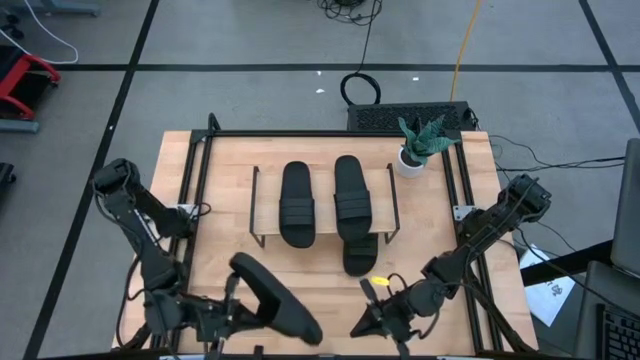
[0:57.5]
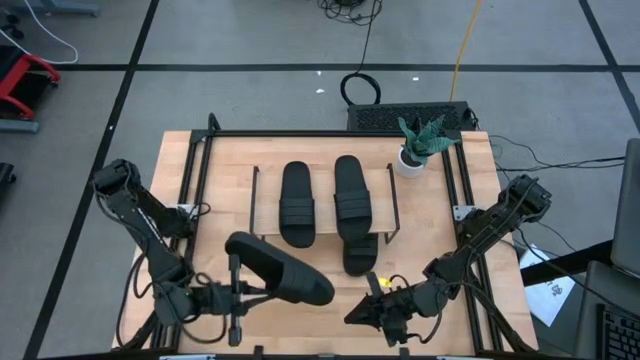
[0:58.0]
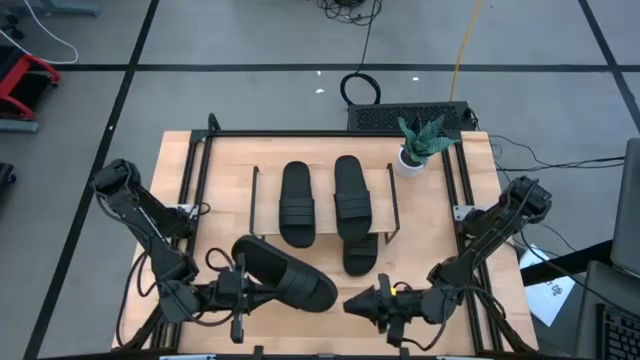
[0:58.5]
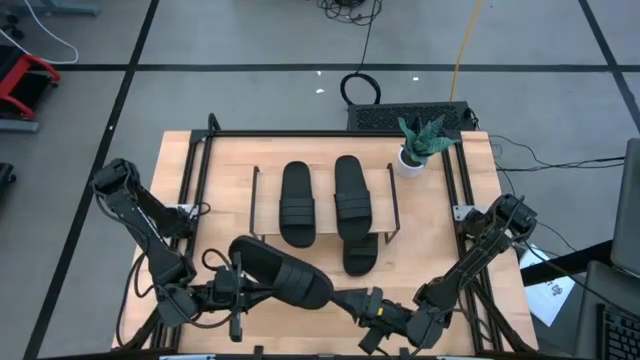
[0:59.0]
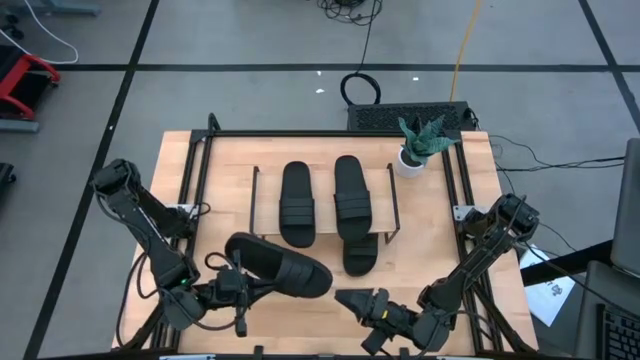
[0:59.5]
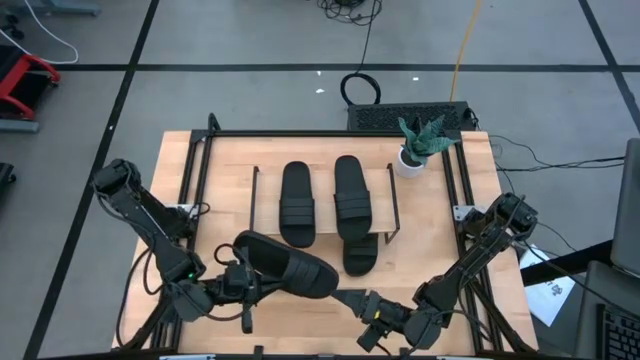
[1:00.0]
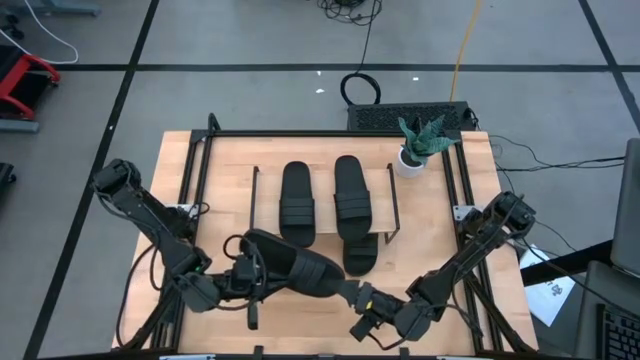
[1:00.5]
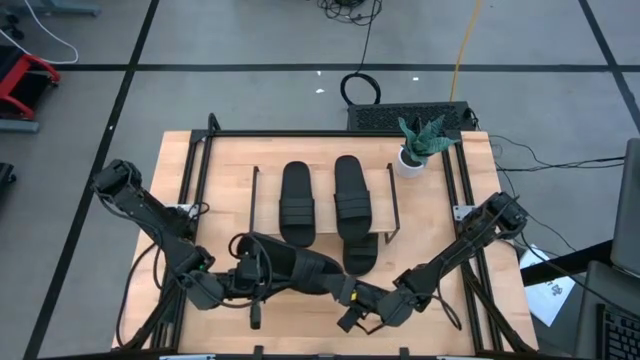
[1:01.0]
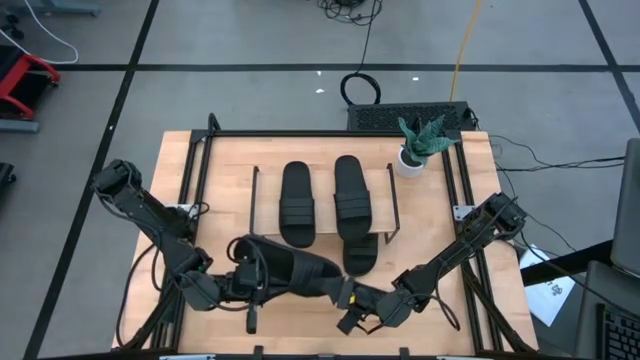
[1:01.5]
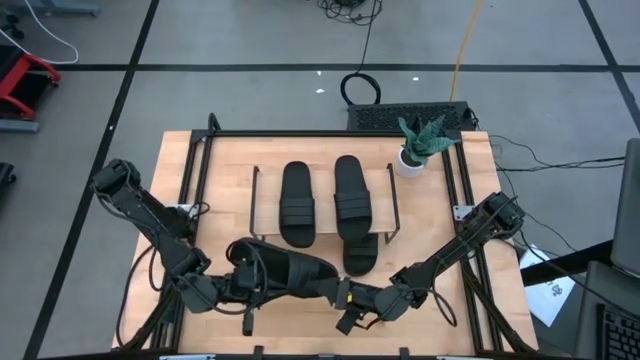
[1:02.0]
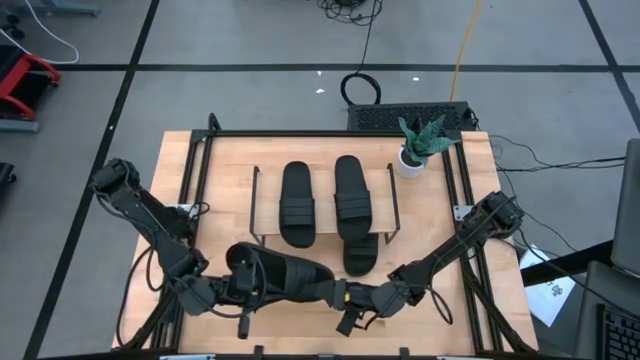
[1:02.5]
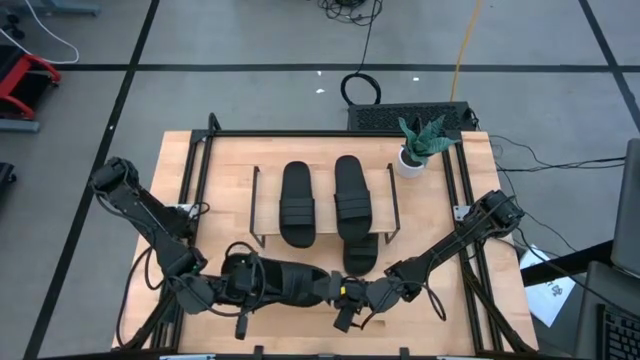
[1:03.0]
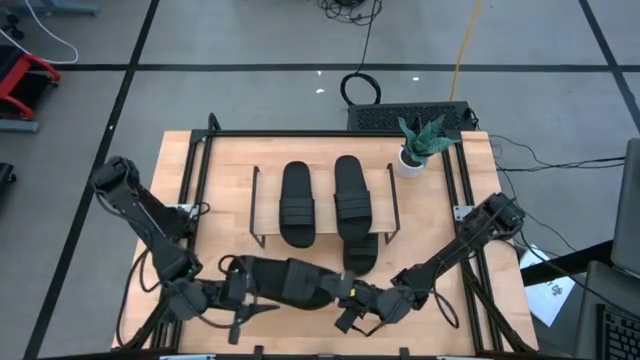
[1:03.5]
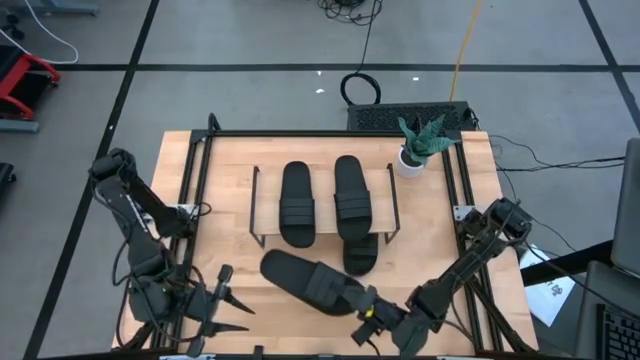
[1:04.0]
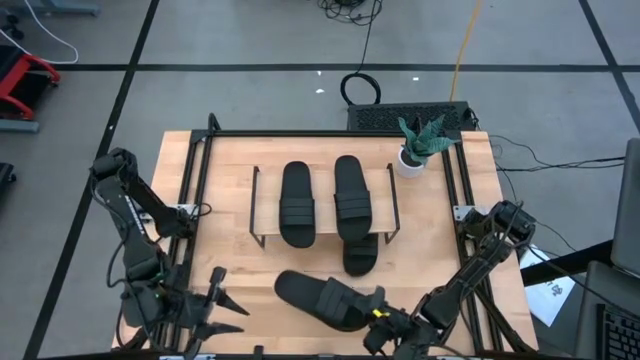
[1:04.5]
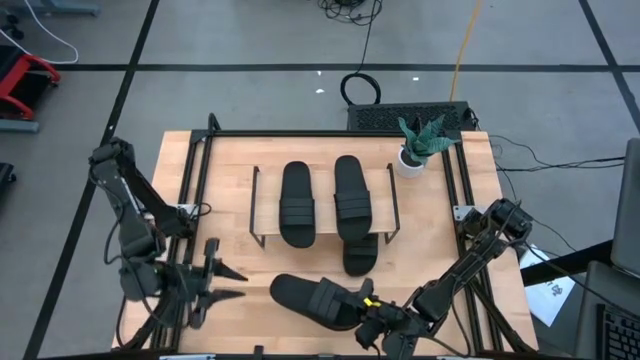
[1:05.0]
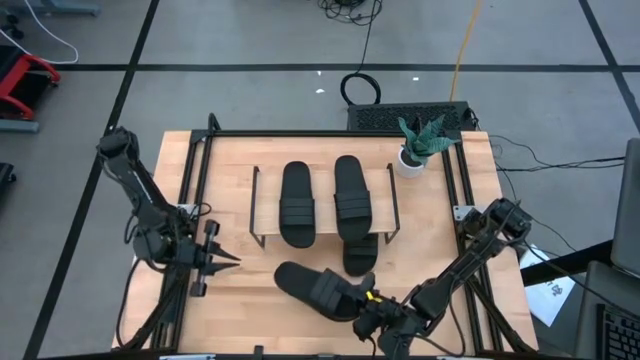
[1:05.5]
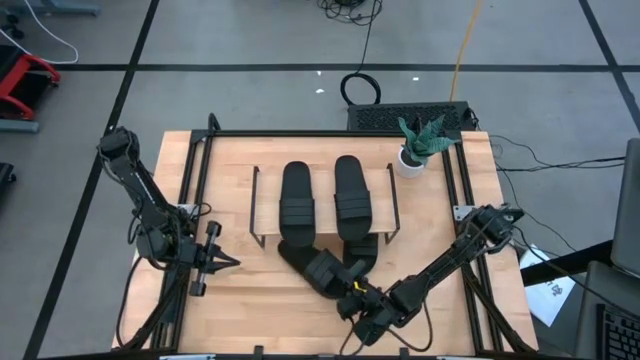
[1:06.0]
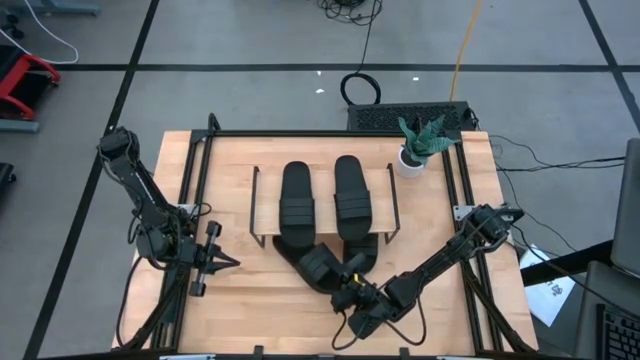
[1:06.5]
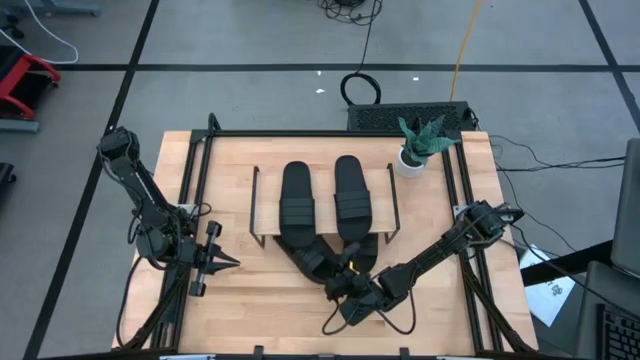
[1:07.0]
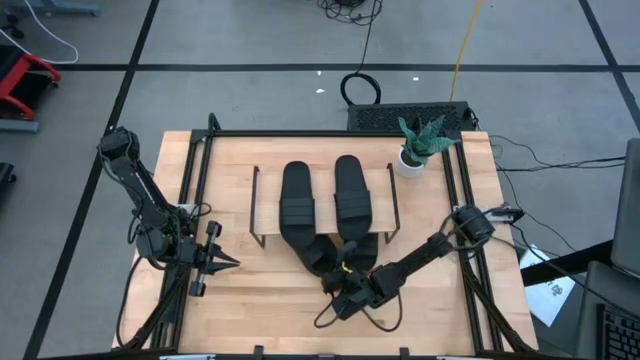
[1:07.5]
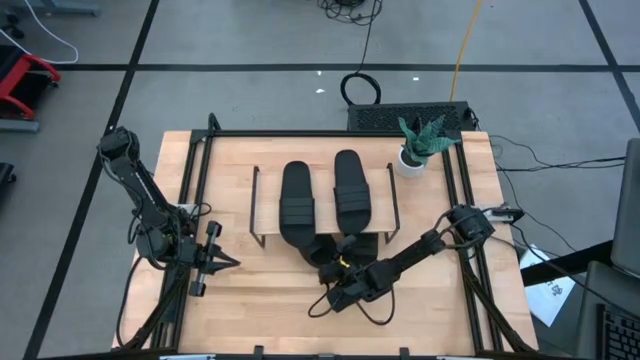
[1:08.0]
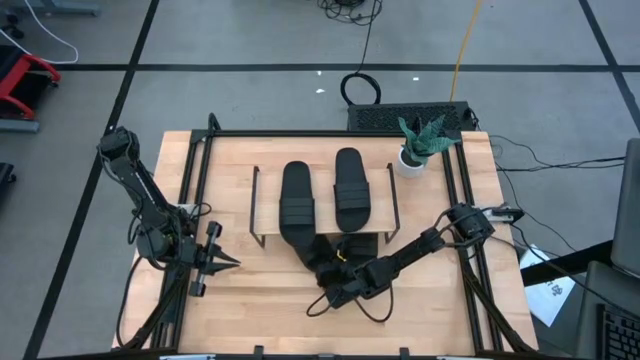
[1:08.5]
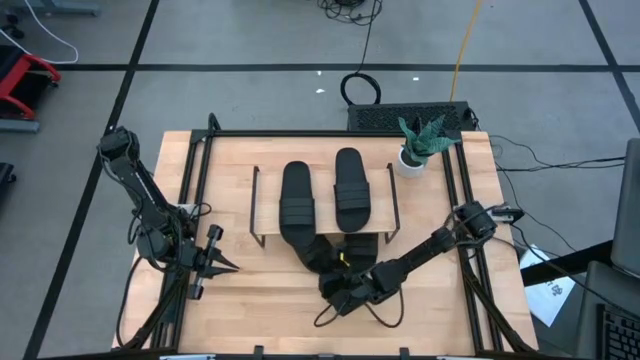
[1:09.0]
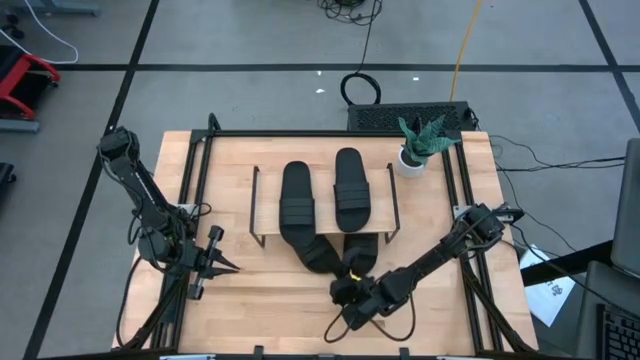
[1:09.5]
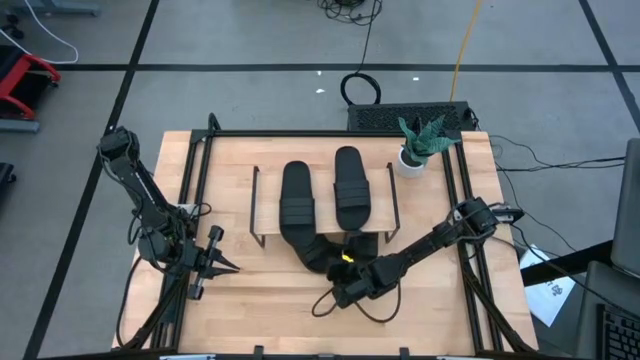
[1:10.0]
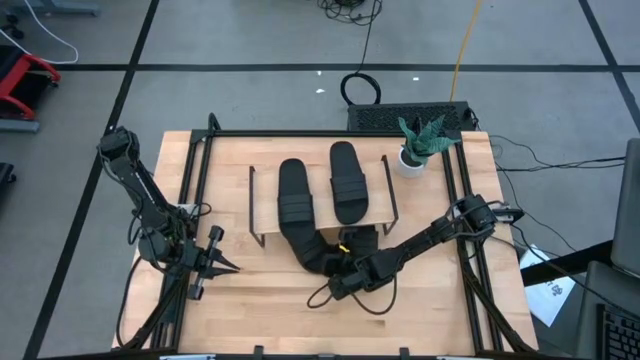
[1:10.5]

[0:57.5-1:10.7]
Task: Pick and place slides into the shelf
Put the black slide under the shelf

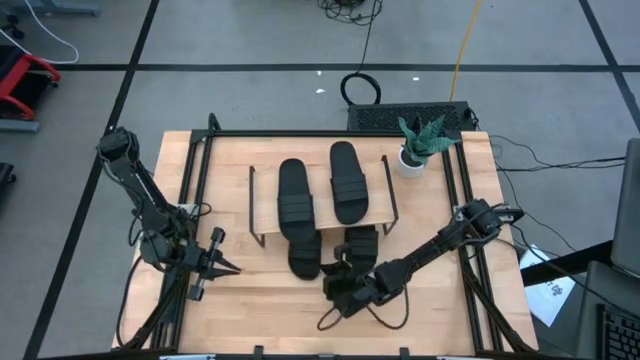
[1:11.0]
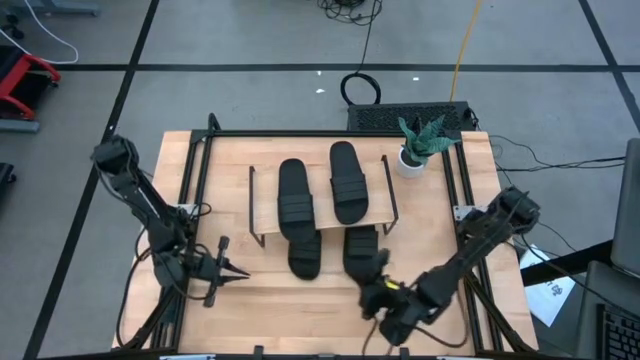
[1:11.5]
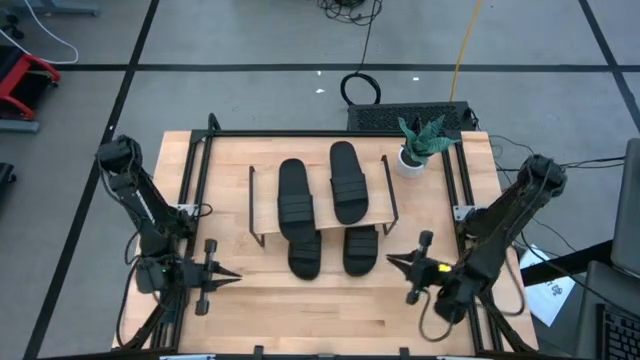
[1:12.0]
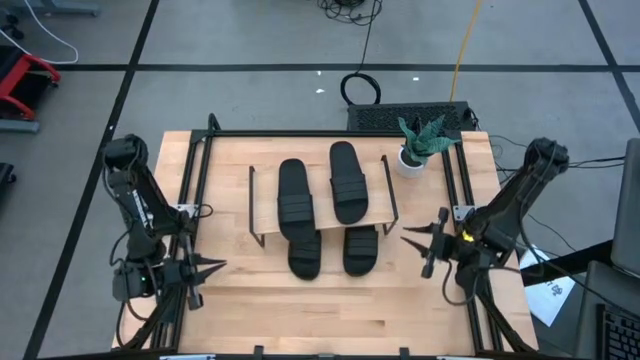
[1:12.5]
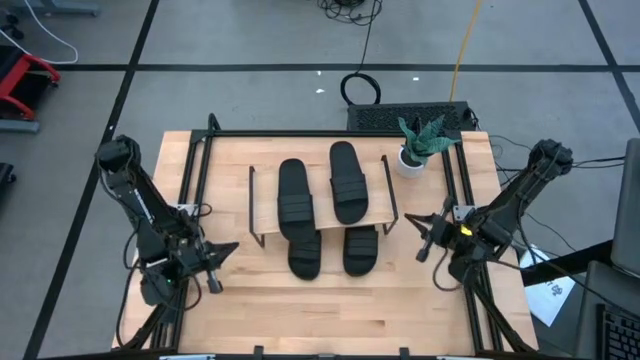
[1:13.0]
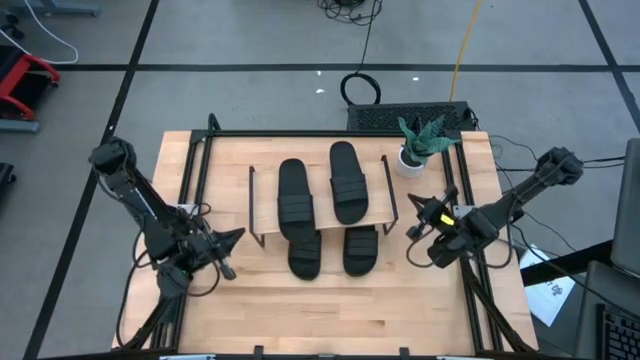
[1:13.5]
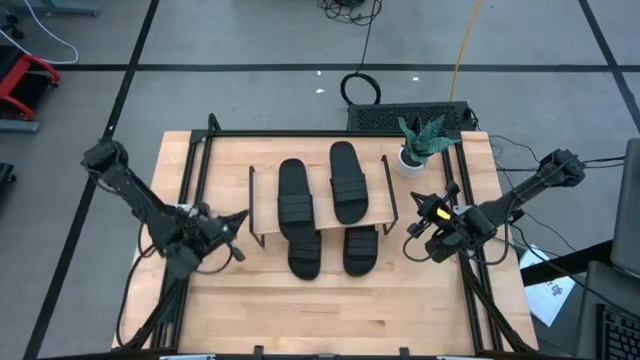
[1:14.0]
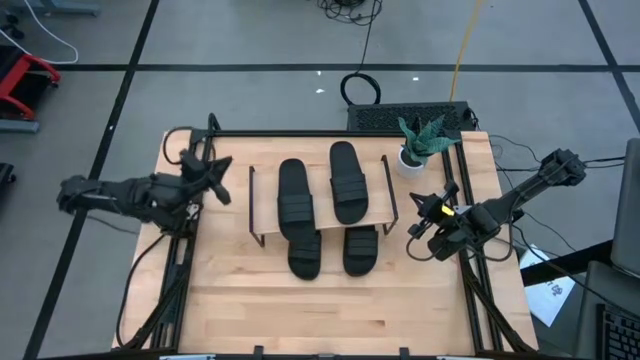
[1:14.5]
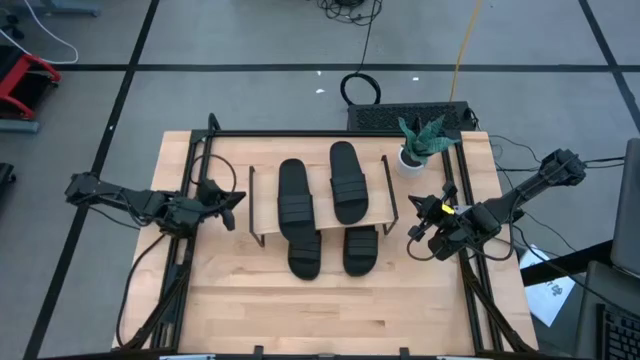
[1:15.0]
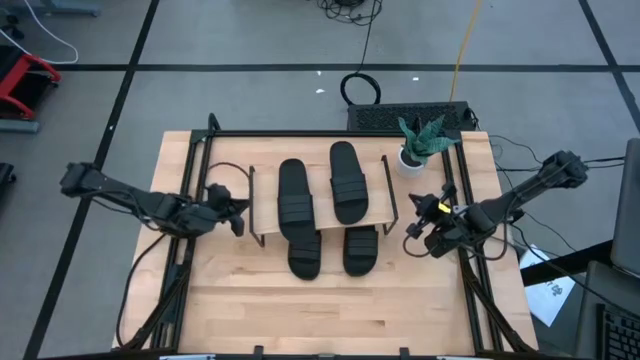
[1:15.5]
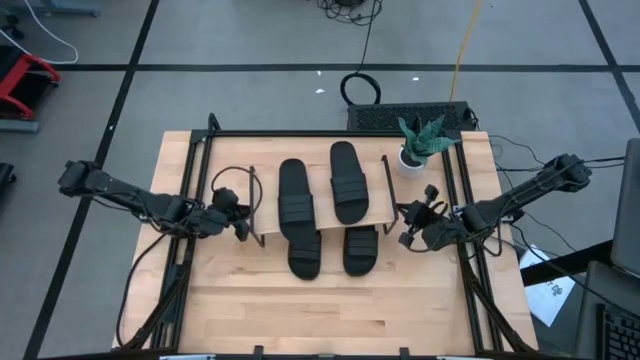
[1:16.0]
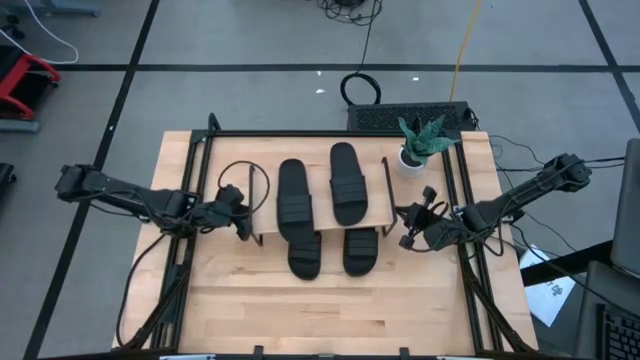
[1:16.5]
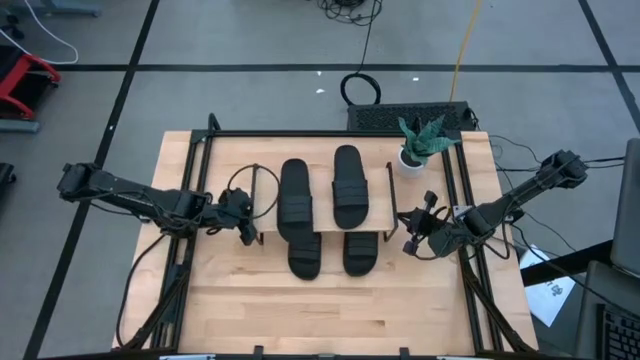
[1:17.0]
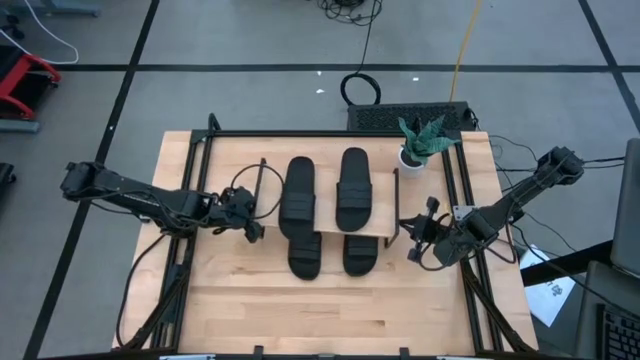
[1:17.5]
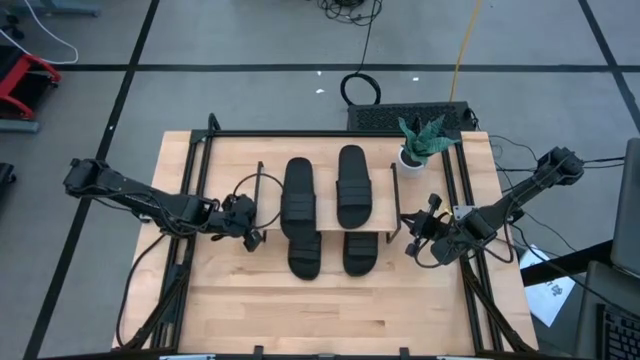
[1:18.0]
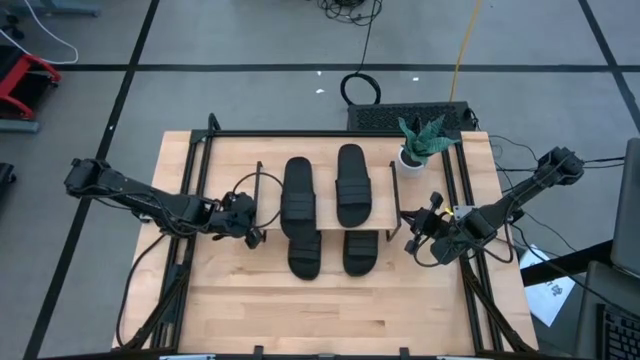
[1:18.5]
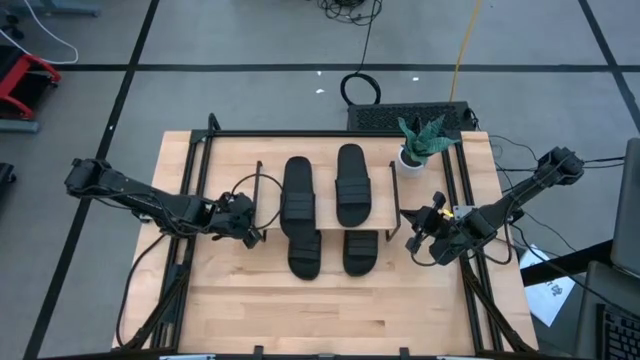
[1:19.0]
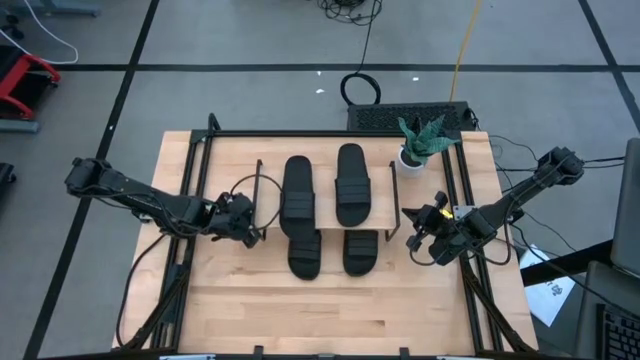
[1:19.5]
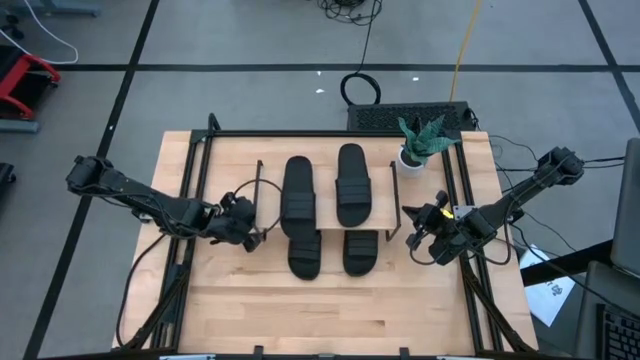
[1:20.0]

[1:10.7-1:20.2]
Adjust the shelf
